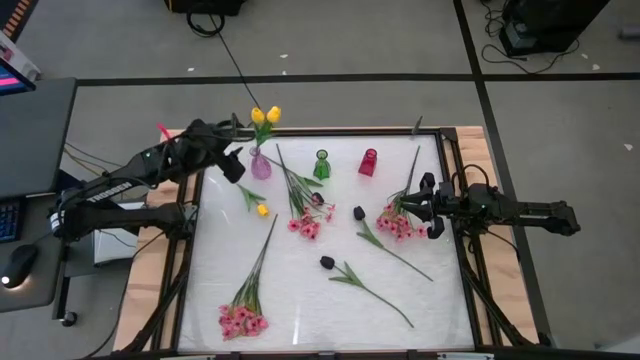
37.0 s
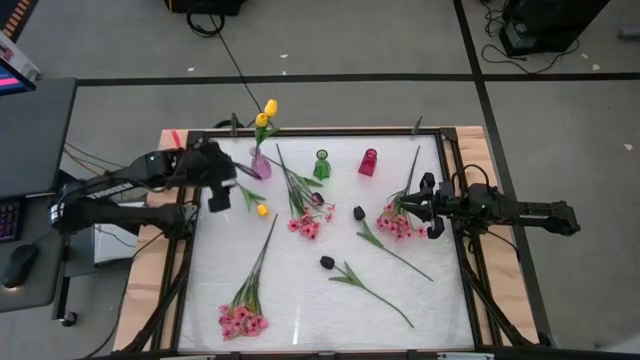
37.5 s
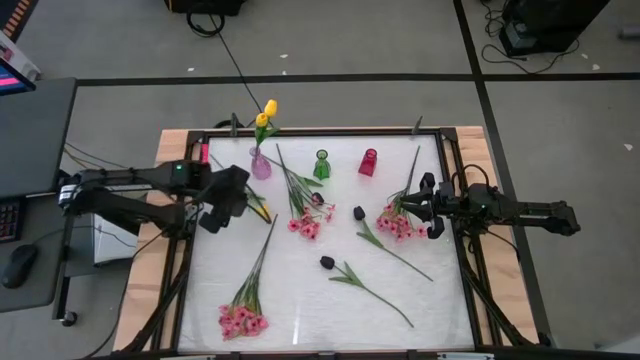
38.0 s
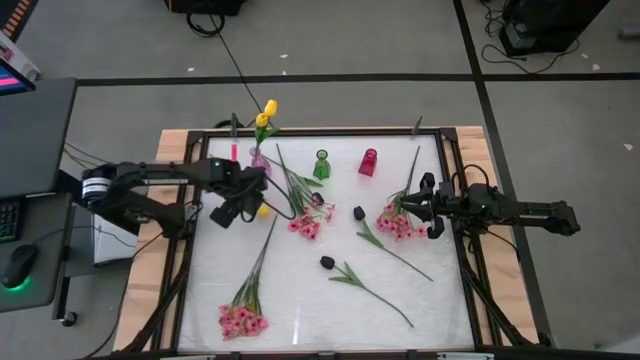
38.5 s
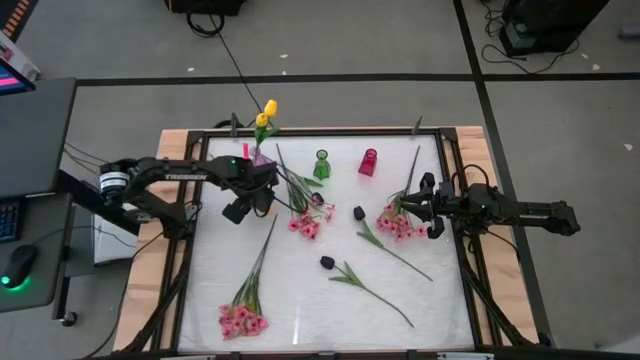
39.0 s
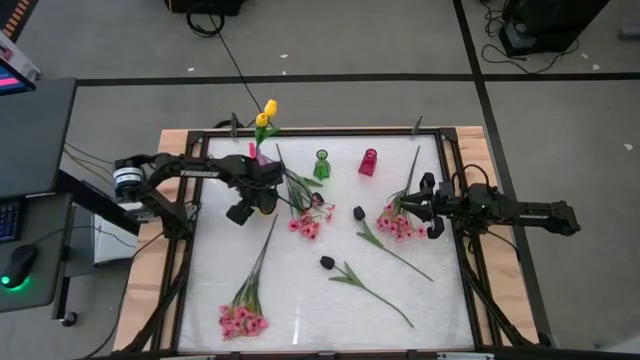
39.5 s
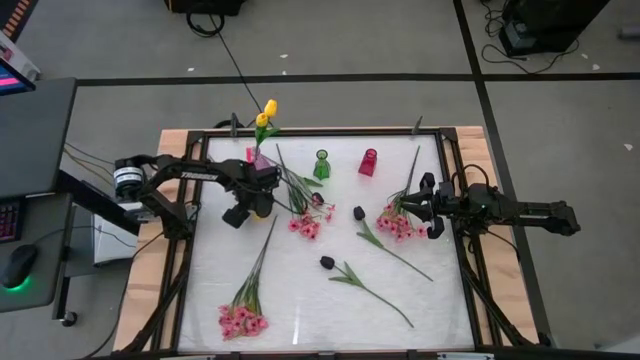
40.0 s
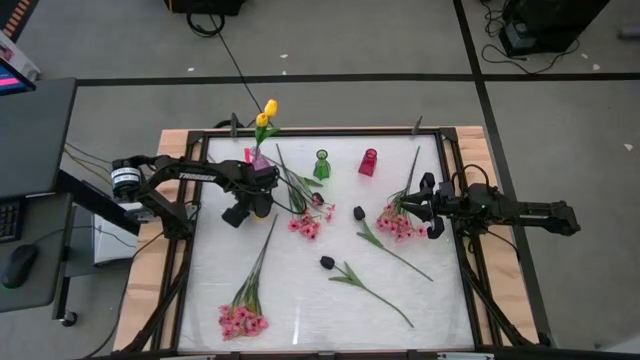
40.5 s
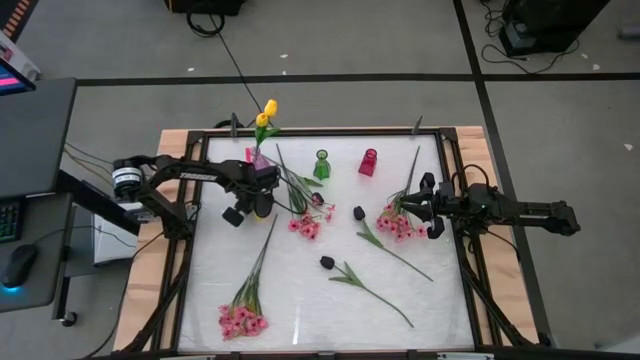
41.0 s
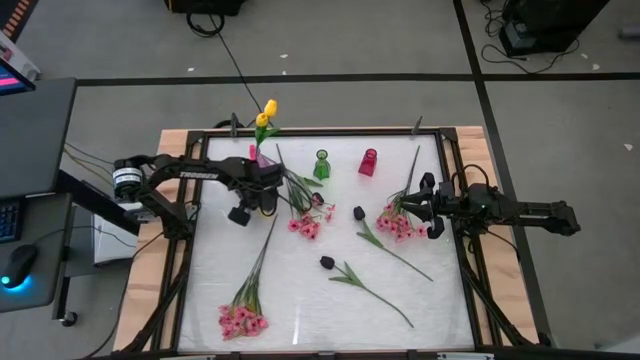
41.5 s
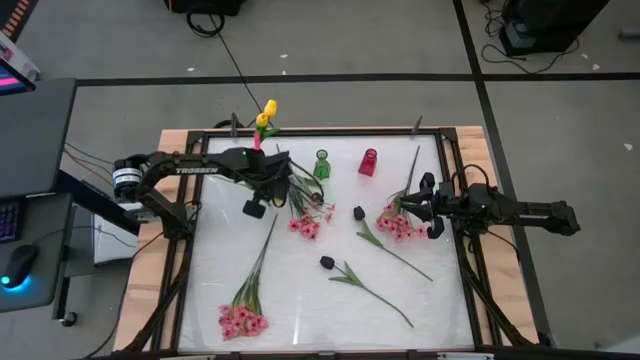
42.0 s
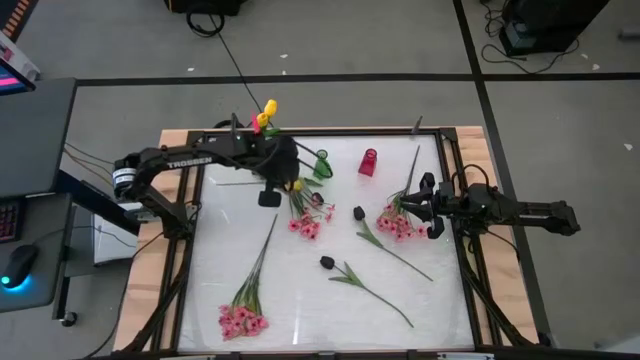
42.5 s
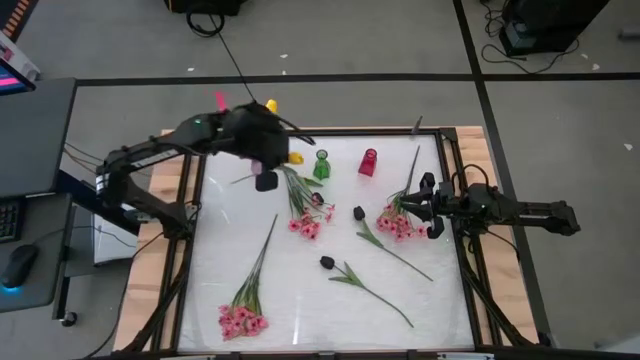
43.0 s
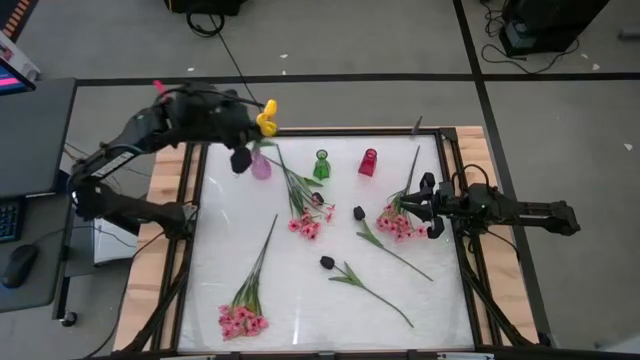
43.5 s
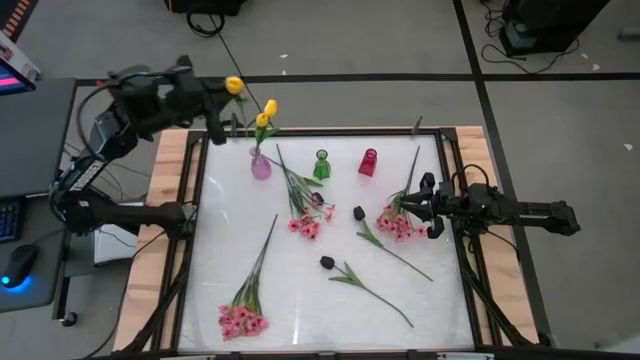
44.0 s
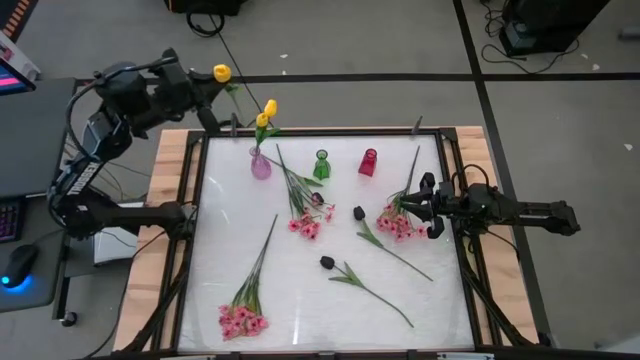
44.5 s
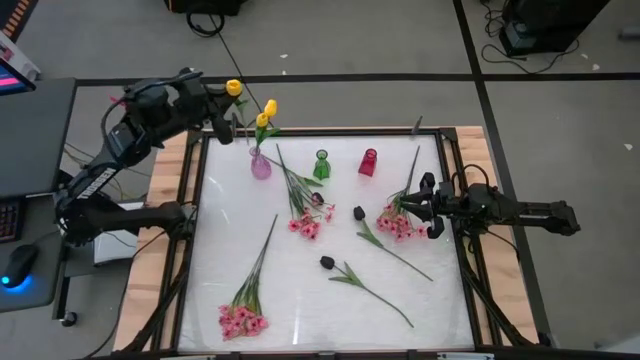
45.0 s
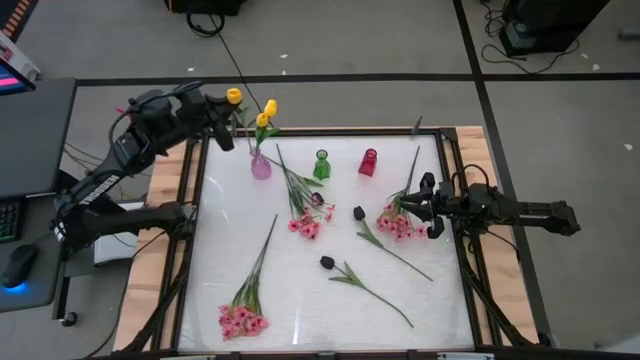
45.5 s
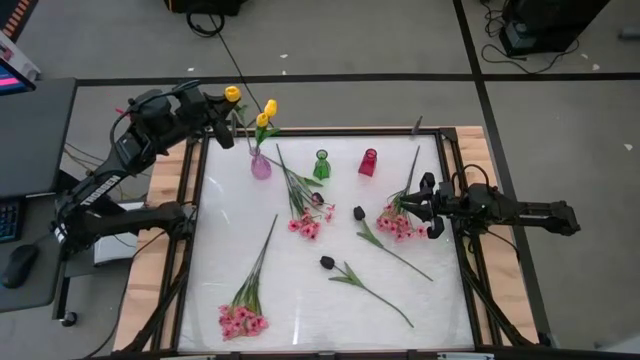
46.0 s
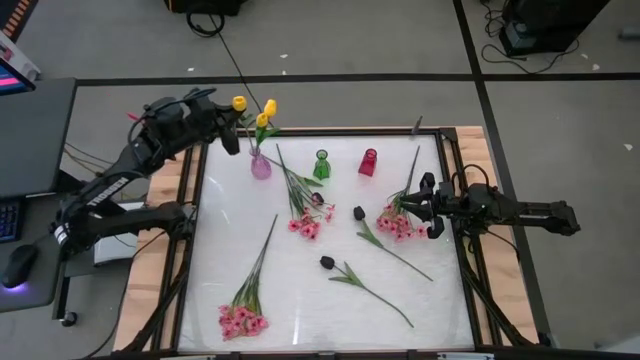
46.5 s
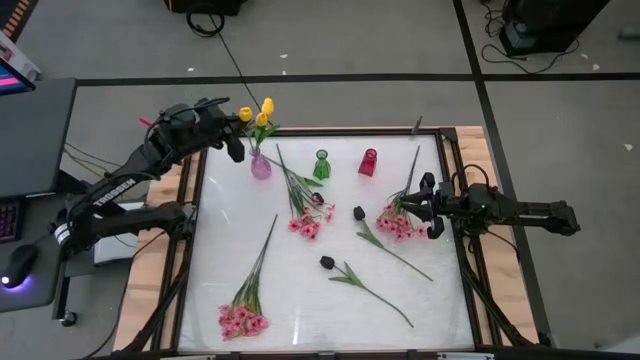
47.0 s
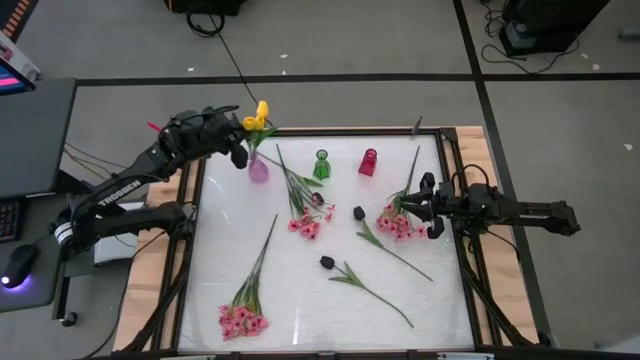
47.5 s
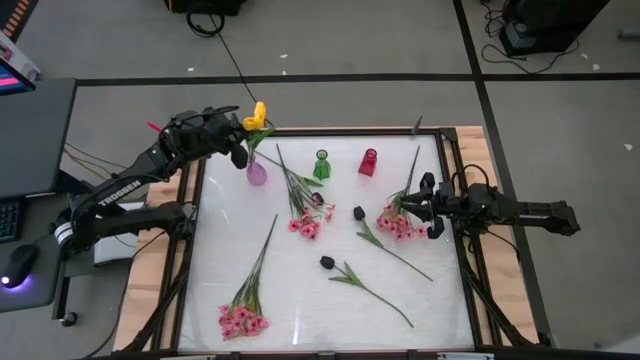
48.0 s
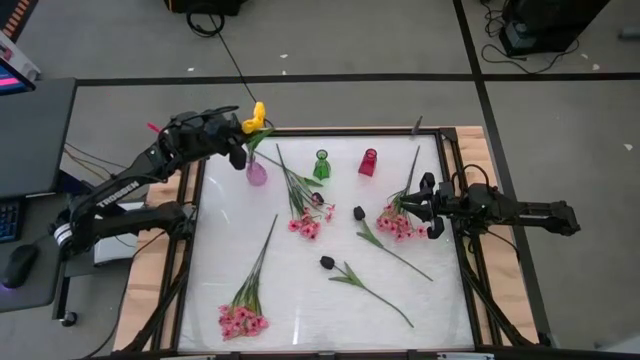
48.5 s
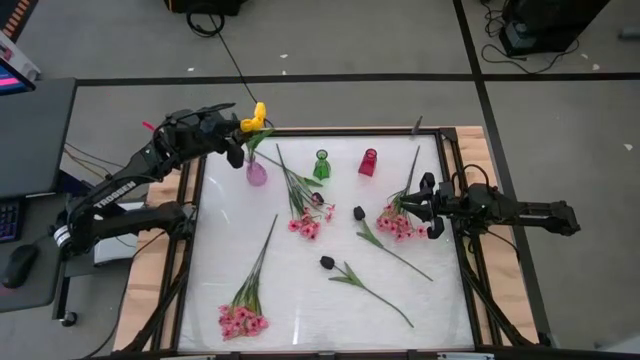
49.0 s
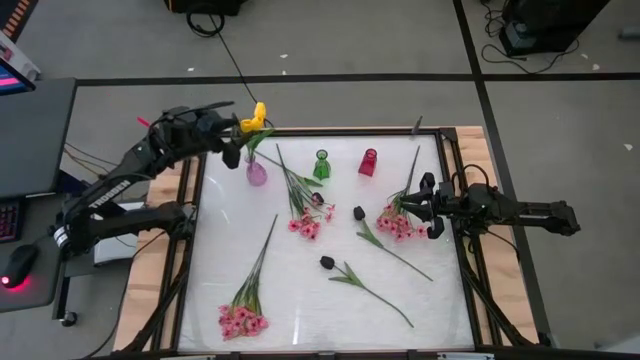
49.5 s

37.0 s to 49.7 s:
Task: Sort flowers into vase by color
Put the yellow flower into the purple vase

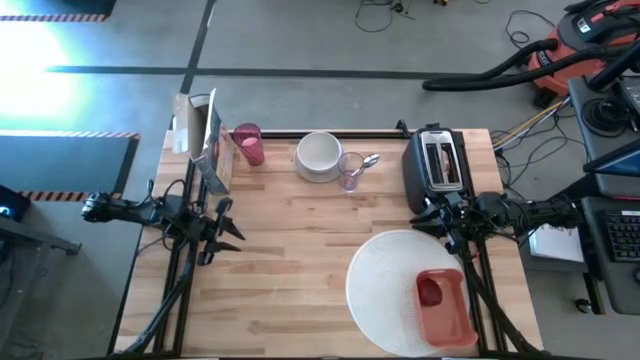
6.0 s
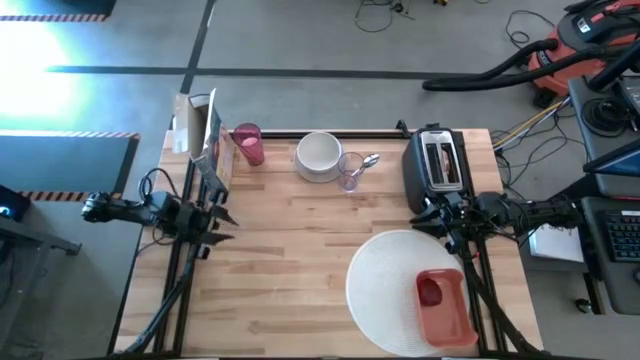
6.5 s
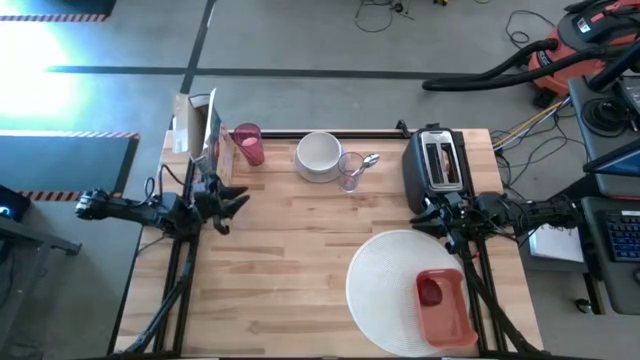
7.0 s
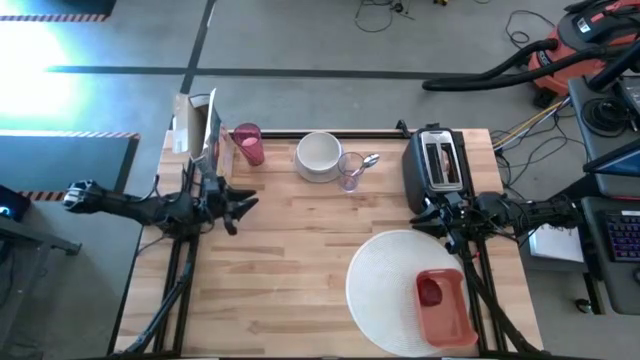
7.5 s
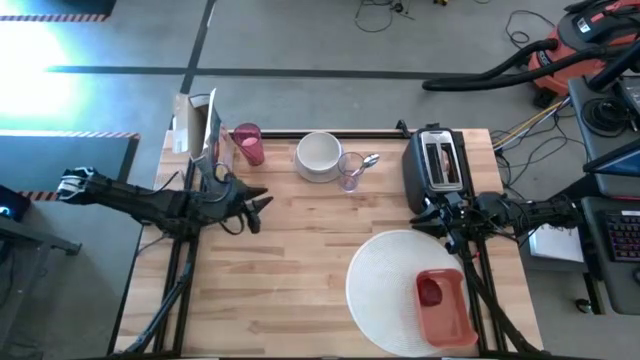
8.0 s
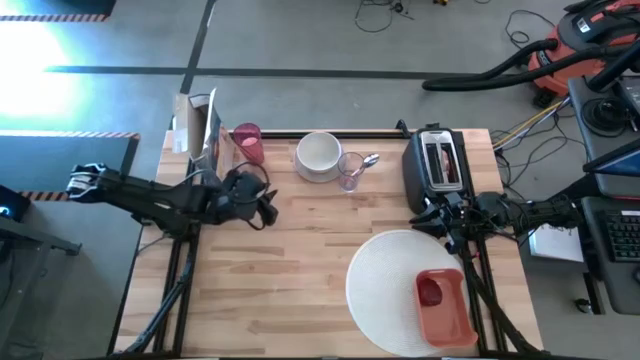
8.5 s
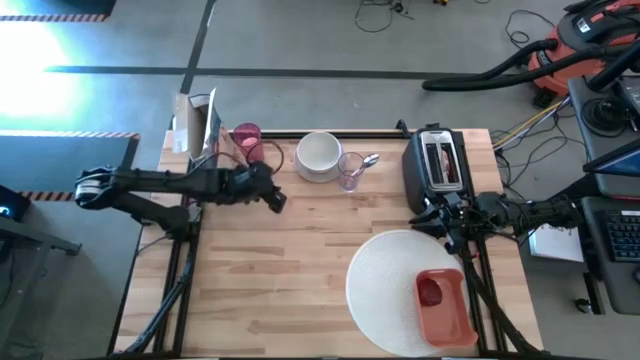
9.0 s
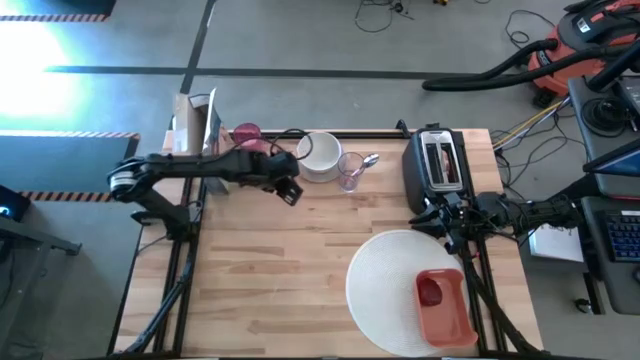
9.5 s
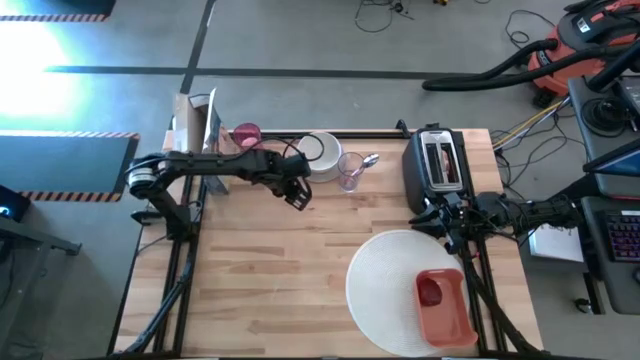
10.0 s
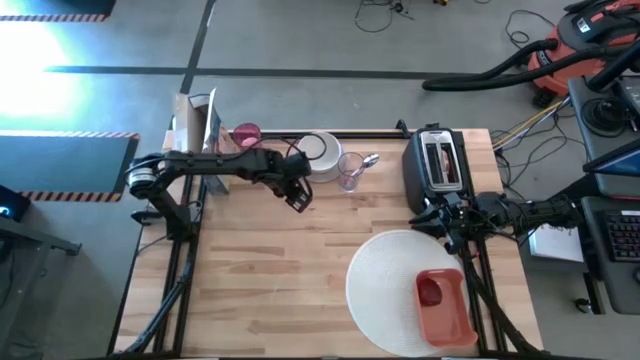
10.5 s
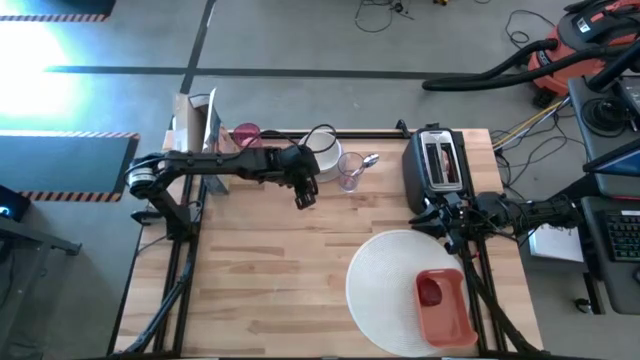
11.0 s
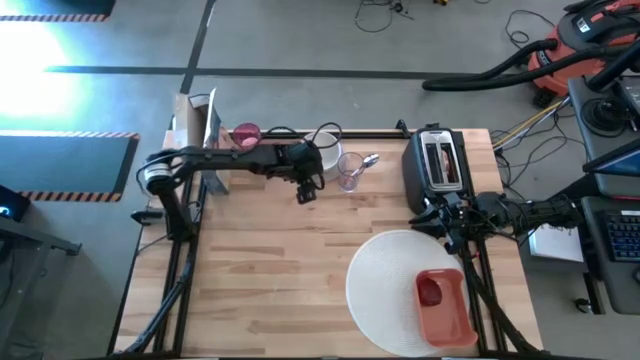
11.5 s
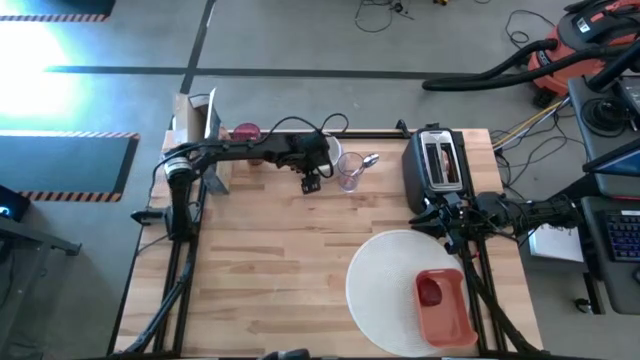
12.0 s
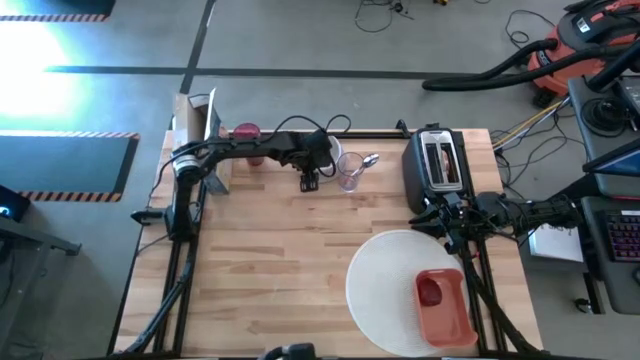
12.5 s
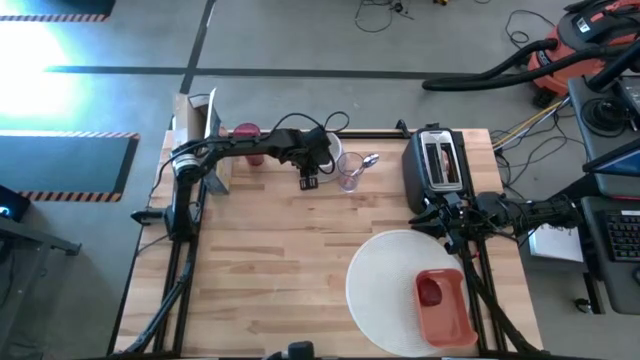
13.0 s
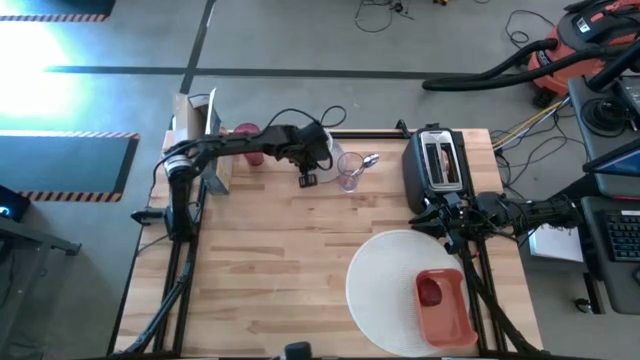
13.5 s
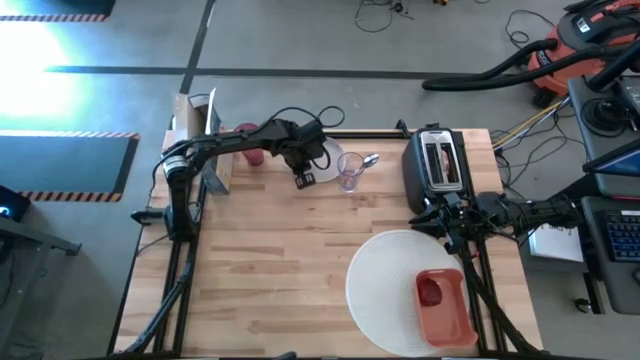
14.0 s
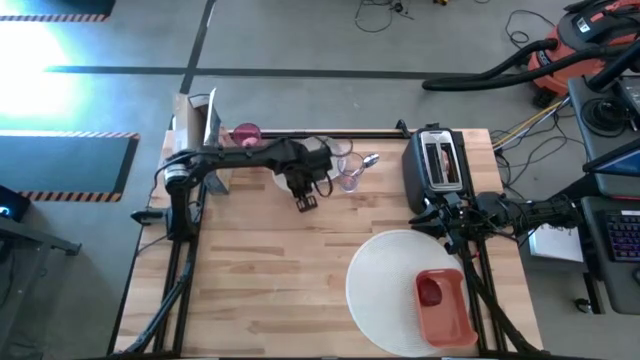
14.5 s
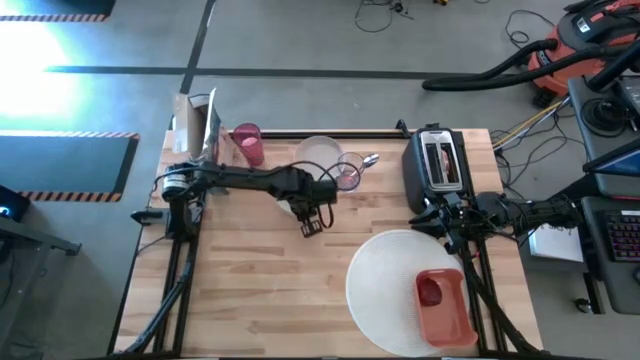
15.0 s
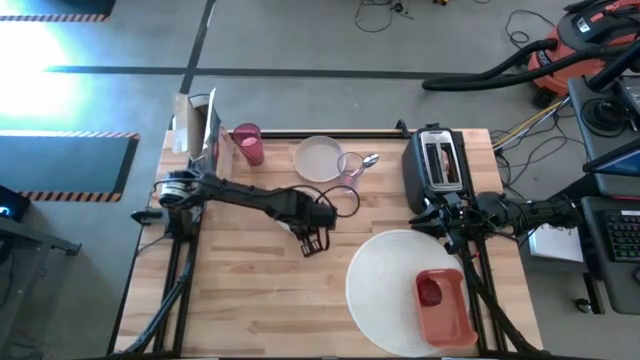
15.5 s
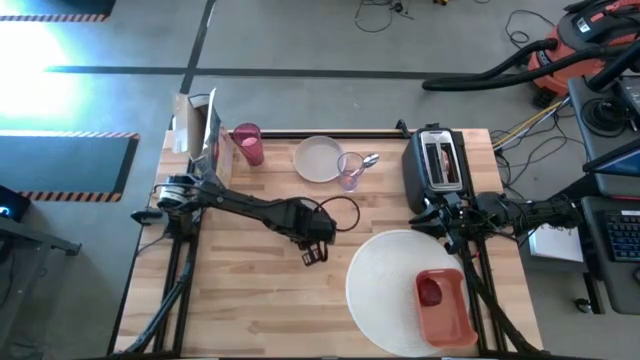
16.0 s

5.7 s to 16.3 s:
Task: Arrange a breakfast setting
Move the white bowl to the center of the table
